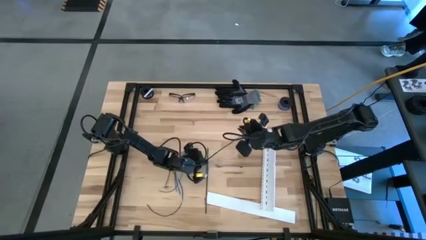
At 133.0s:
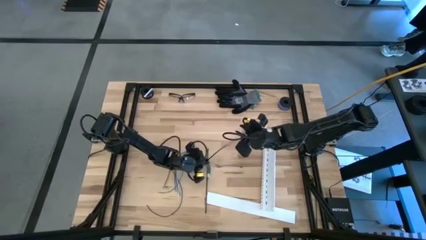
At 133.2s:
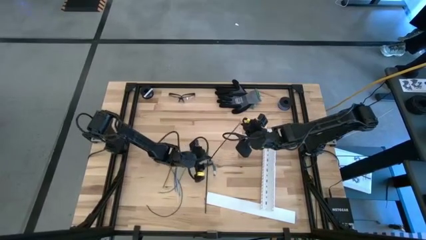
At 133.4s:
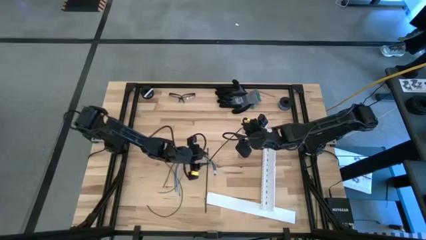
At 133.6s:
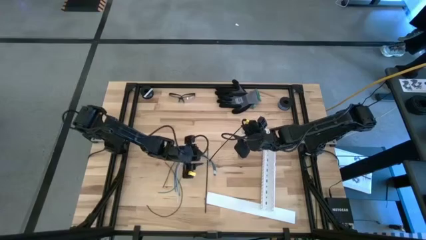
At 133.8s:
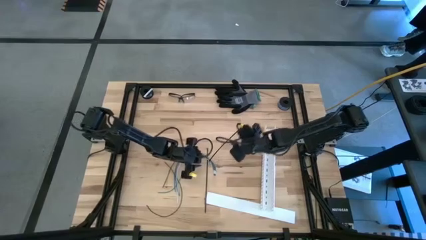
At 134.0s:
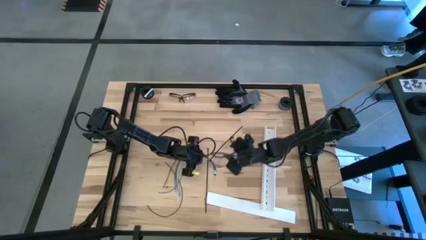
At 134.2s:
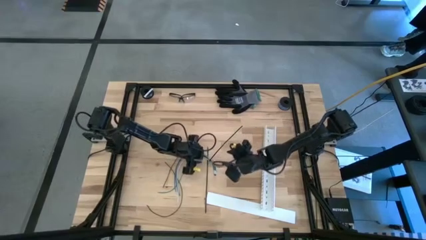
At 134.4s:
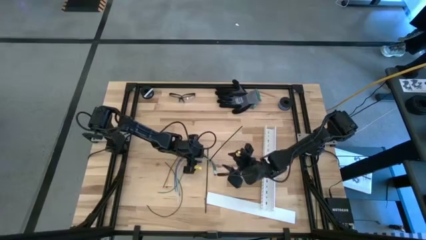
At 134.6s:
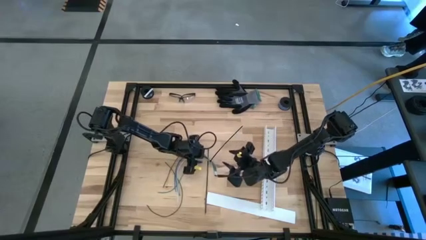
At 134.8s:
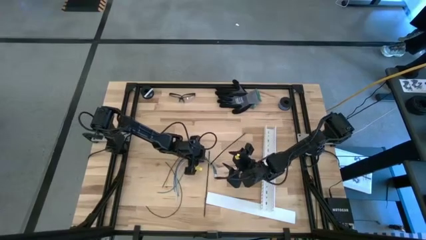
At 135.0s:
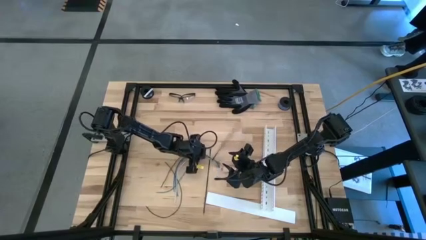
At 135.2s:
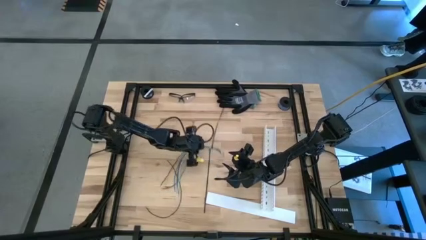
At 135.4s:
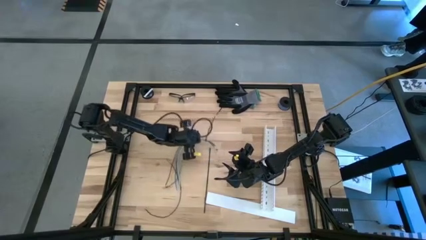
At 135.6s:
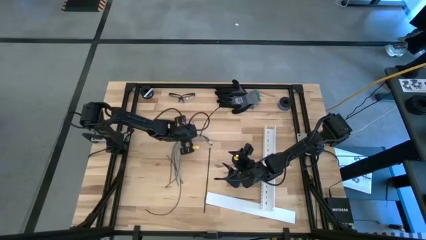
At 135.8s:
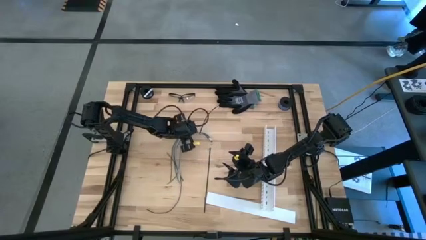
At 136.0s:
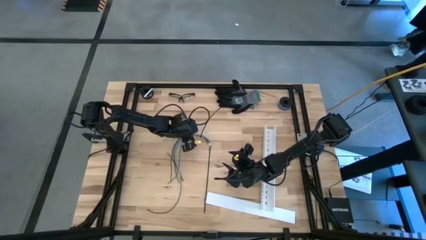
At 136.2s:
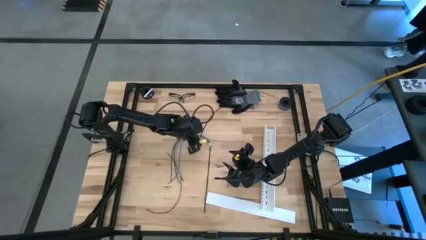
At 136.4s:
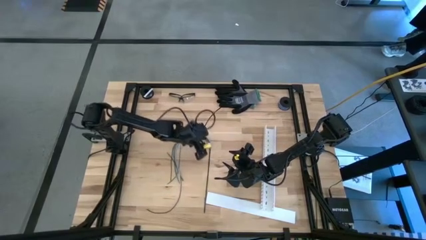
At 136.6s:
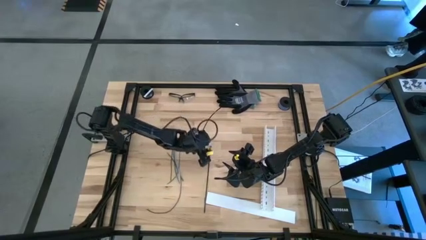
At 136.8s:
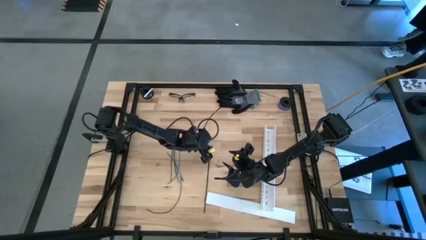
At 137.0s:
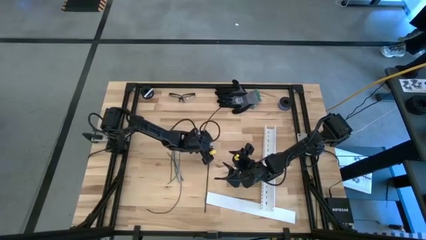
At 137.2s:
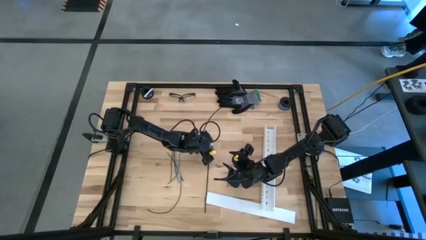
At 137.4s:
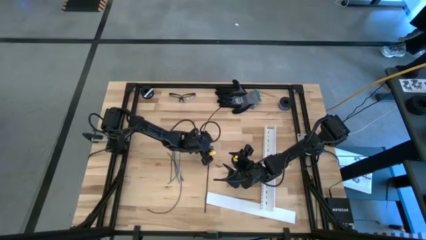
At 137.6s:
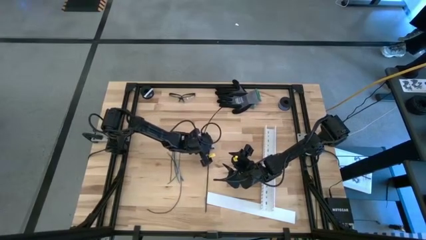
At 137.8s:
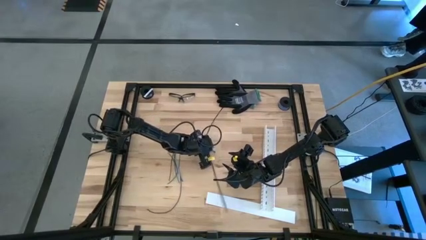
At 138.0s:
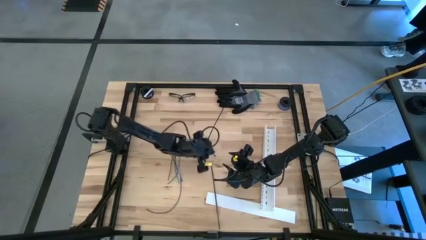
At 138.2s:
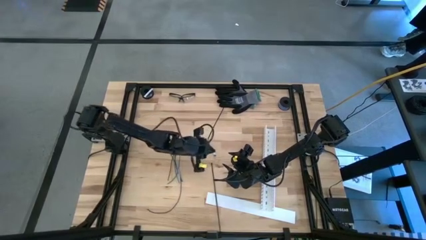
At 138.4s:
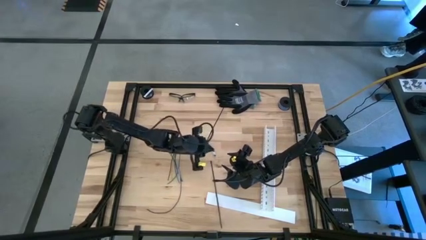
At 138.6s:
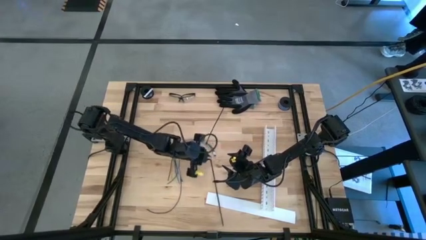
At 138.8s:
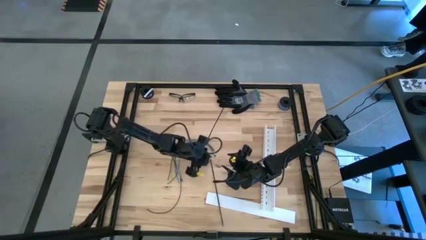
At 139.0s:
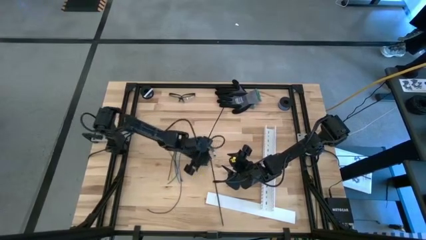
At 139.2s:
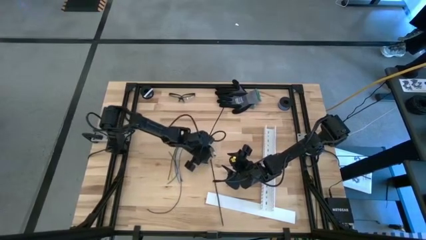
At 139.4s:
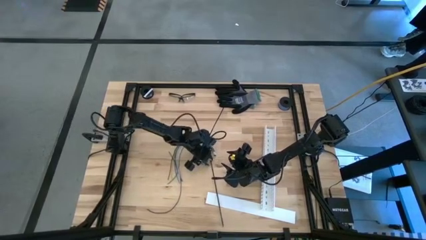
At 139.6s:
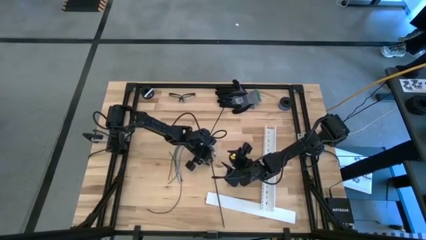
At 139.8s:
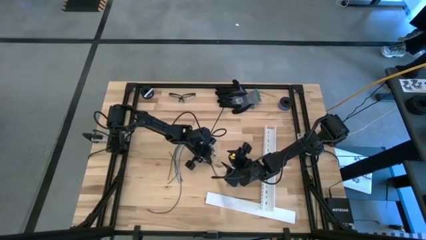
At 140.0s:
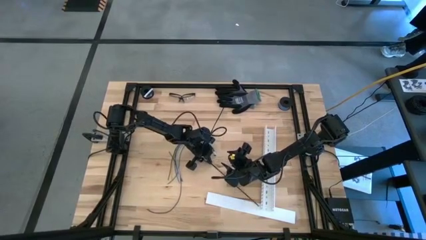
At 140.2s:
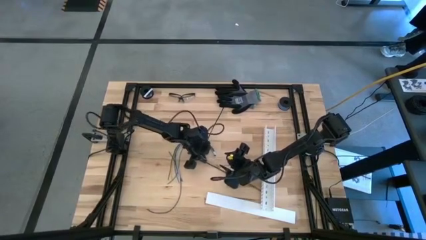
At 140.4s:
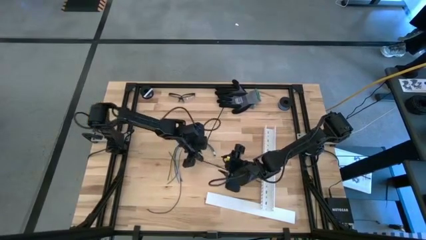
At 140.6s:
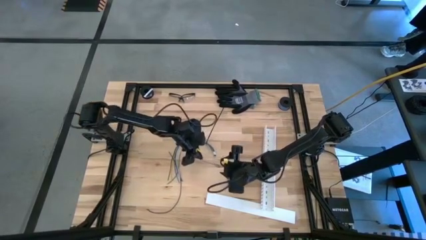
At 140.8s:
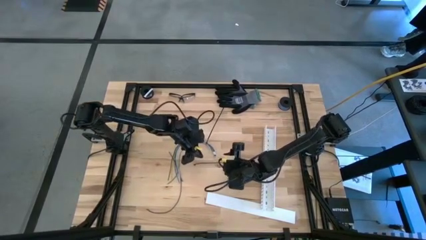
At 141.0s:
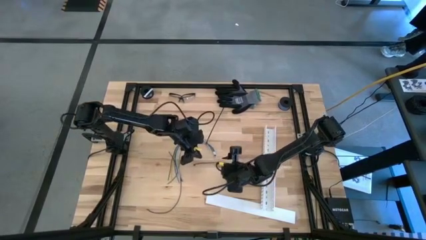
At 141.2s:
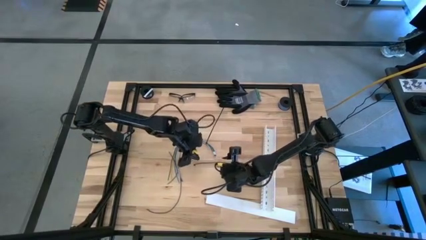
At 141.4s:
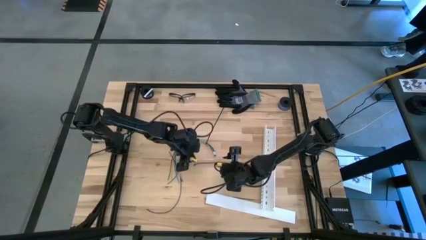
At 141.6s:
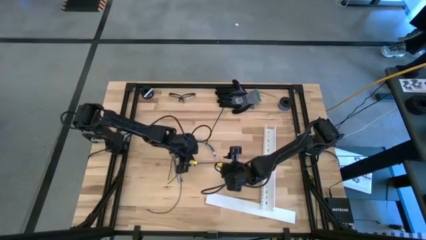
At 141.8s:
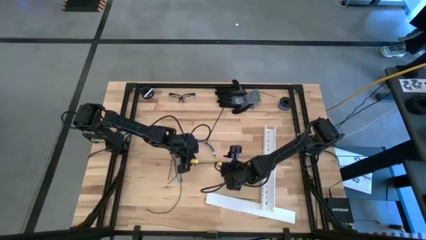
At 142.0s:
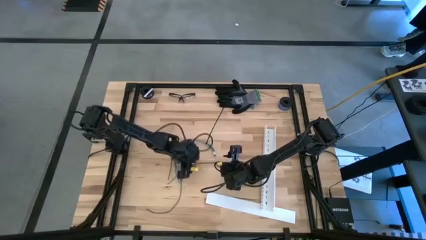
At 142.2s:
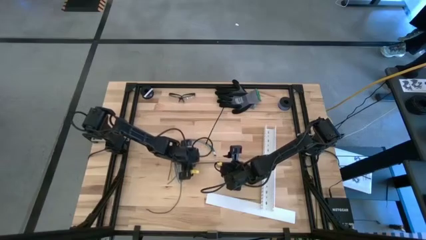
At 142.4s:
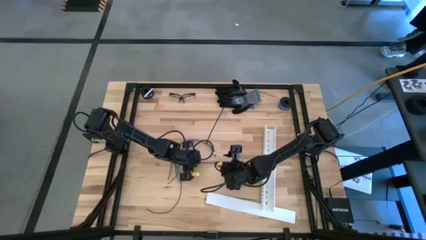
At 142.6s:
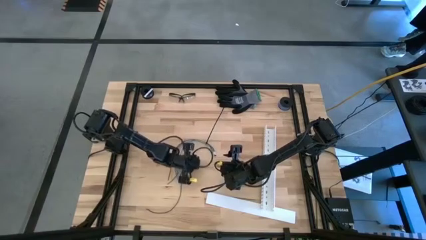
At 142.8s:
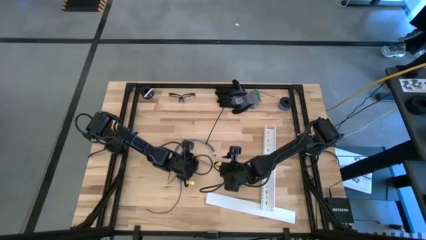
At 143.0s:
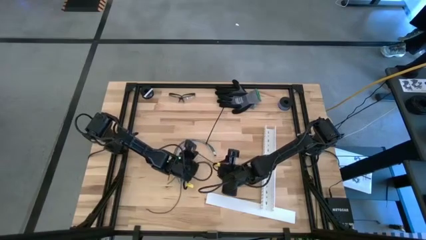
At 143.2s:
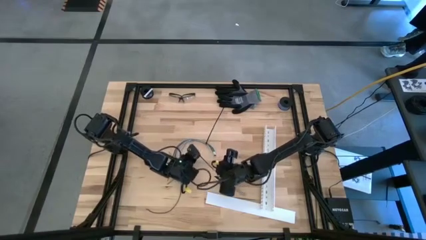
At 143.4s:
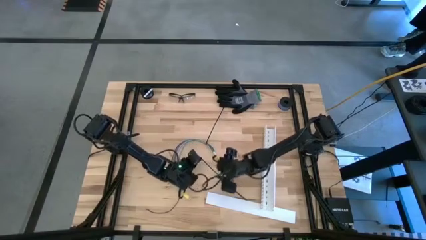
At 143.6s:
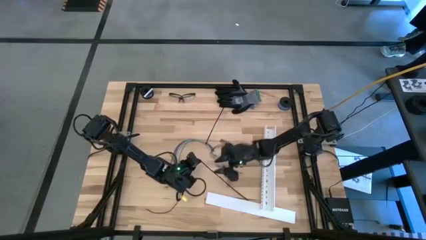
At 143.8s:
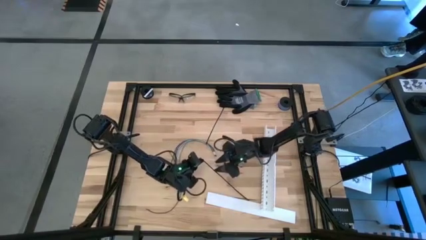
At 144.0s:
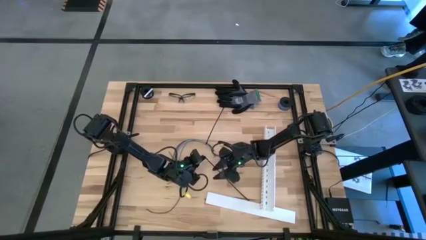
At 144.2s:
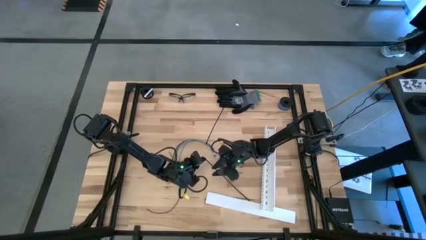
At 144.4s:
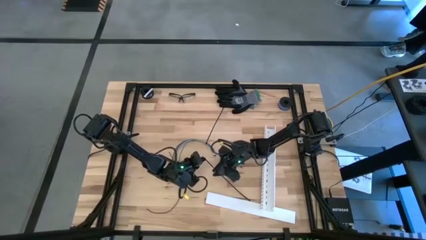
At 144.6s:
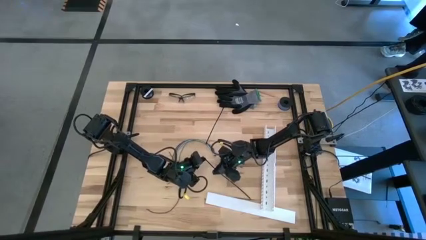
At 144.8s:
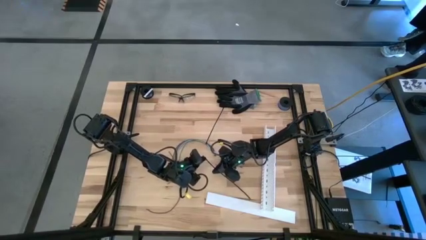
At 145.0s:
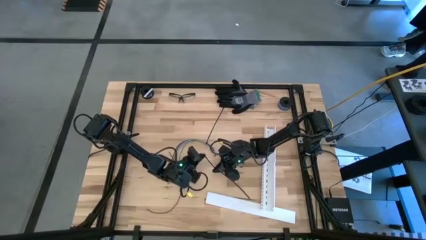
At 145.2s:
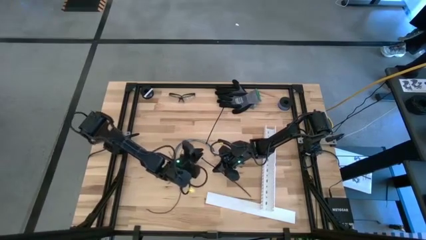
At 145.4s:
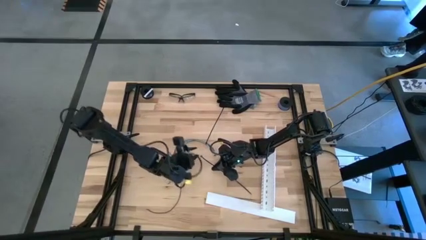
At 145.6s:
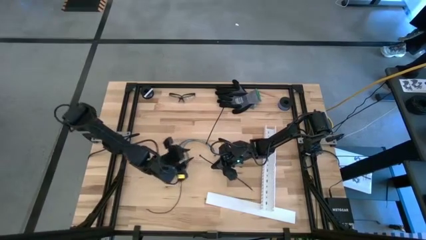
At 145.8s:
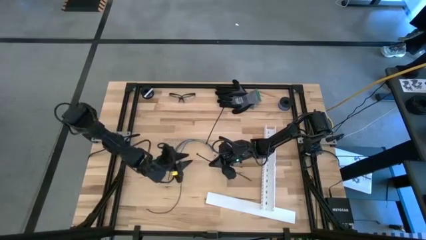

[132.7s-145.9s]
Task: Ziptie cables
Wrap the cable wires with the black zip tie

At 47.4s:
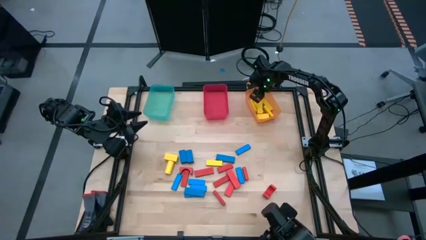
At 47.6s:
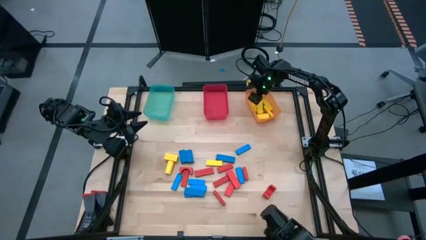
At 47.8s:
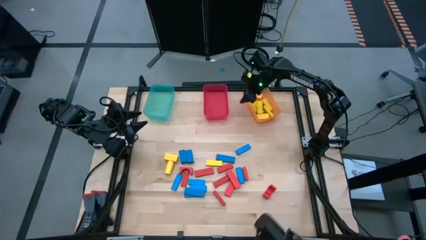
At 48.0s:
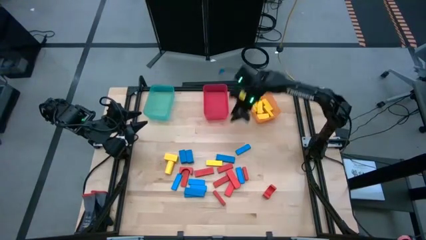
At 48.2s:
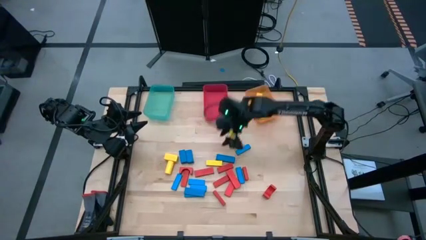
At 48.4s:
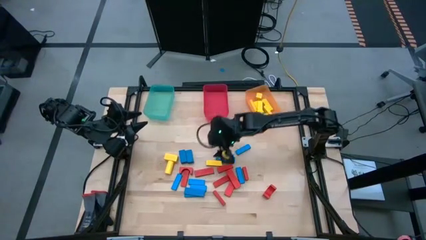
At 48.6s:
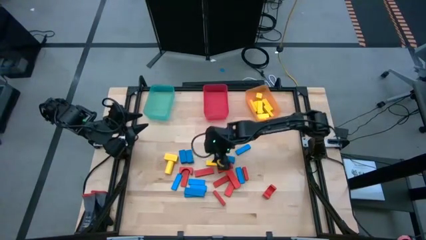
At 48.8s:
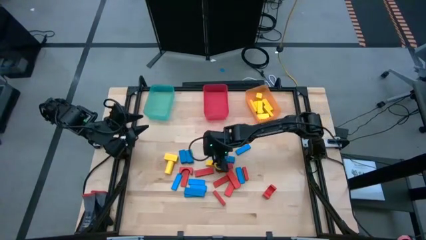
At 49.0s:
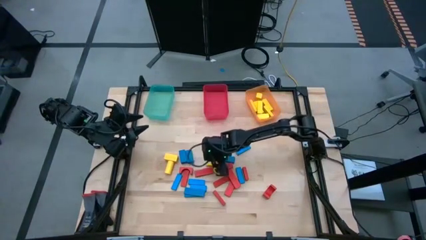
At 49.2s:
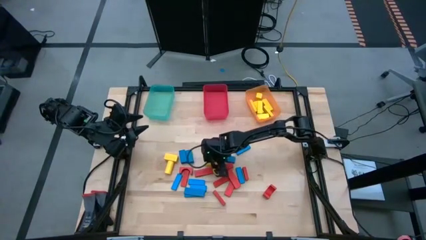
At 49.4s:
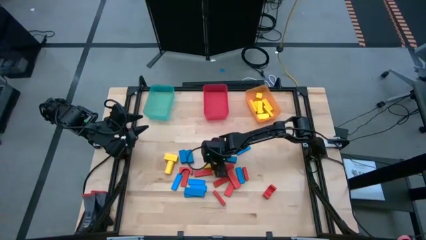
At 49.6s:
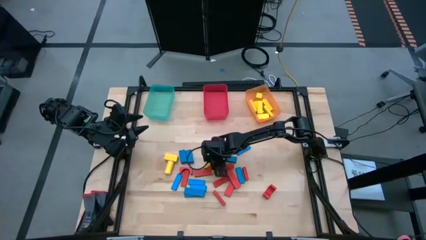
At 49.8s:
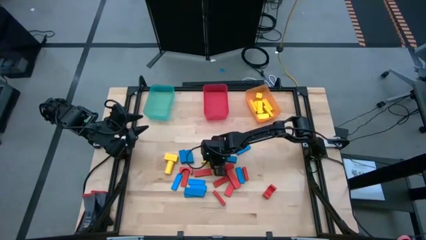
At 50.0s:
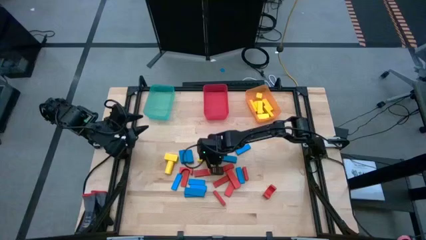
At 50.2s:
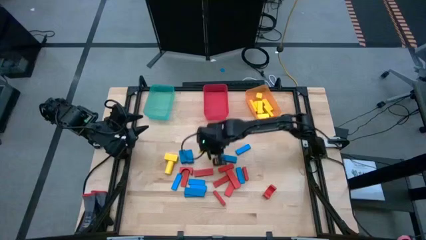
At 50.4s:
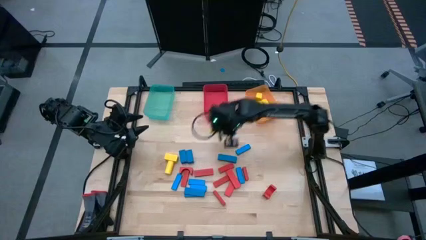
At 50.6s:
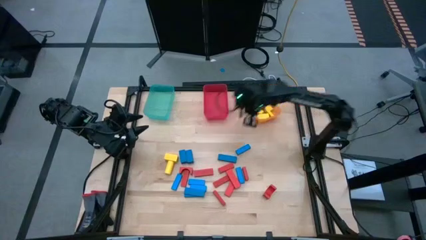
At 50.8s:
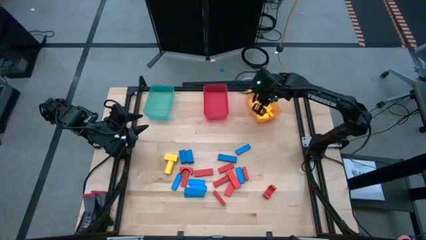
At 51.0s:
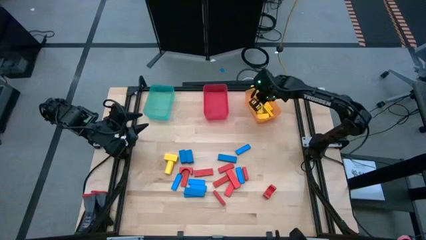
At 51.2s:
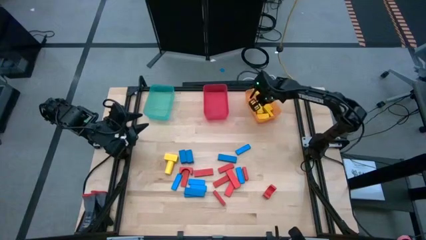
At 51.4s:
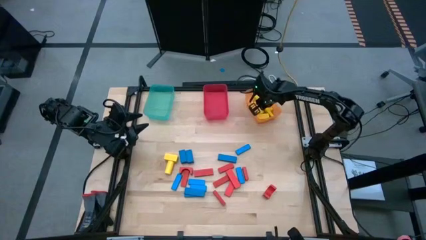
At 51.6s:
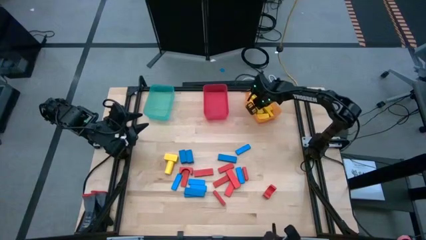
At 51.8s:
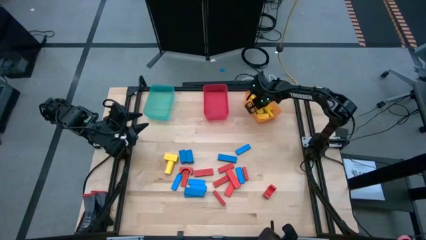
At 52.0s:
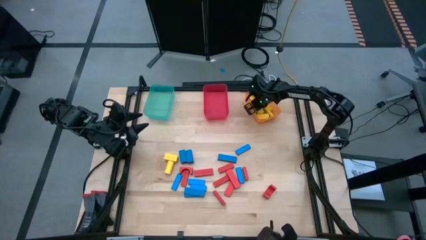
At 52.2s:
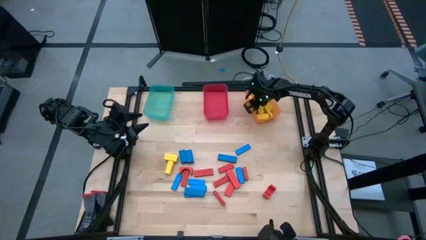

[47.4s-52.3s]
Task: Sort blocks
Put the yellow block into the orange bin
